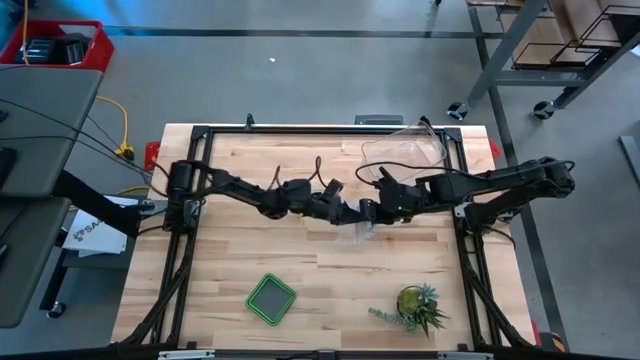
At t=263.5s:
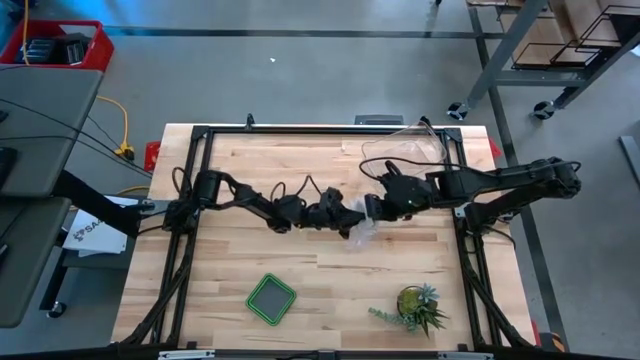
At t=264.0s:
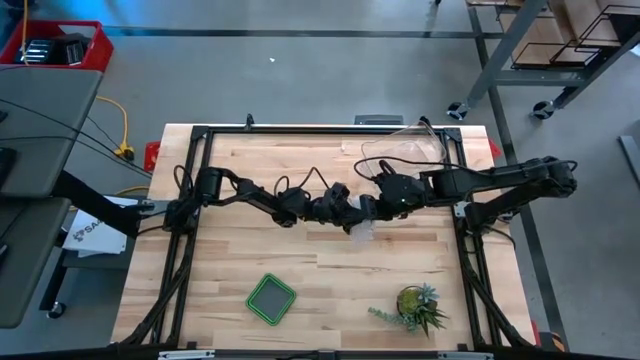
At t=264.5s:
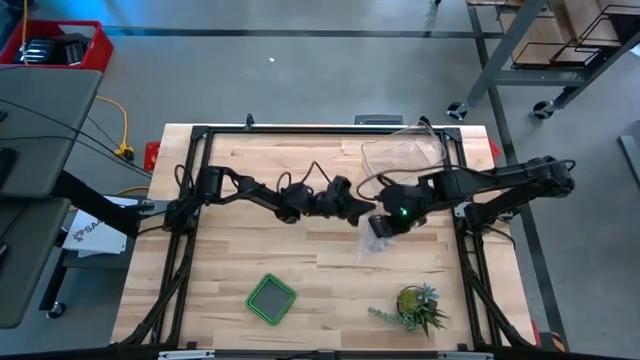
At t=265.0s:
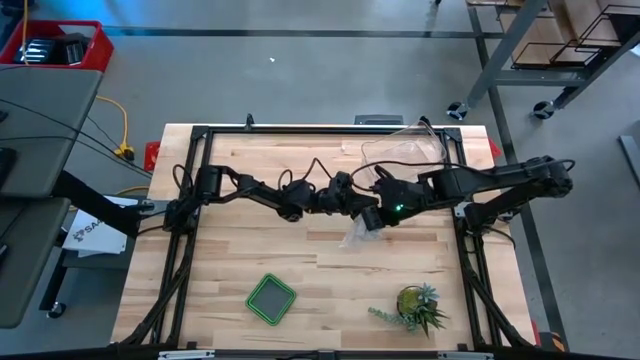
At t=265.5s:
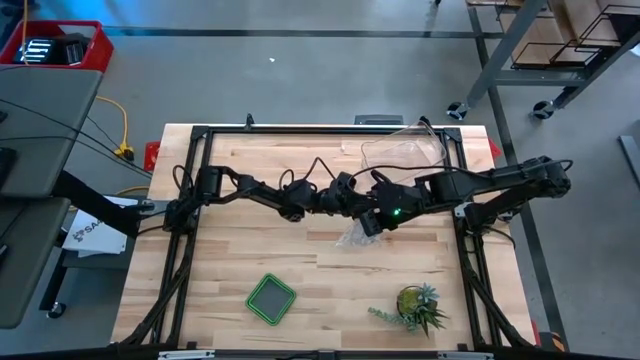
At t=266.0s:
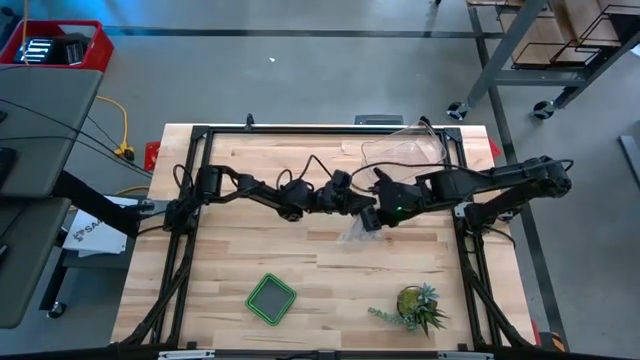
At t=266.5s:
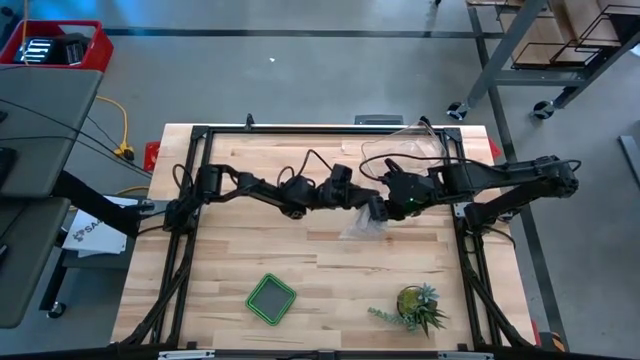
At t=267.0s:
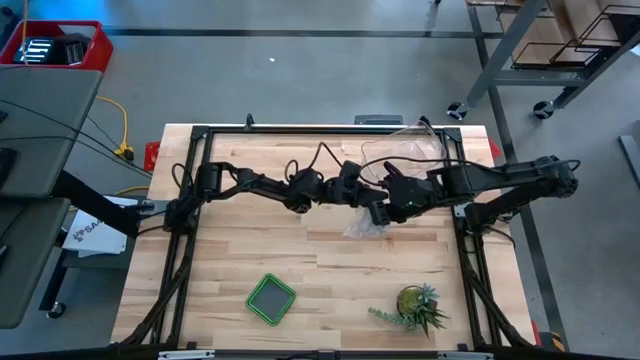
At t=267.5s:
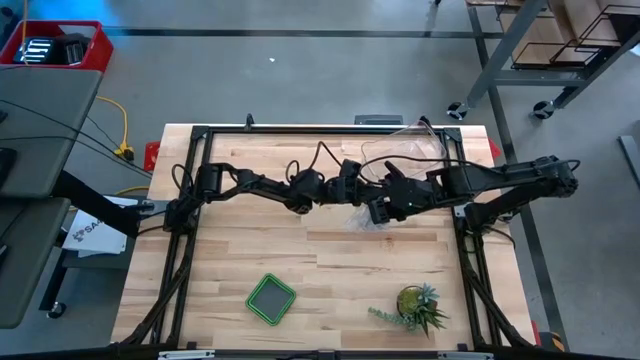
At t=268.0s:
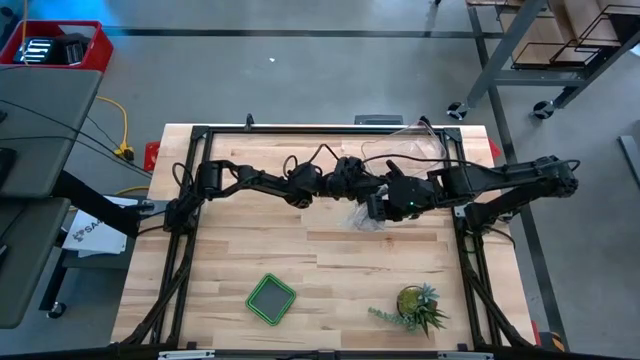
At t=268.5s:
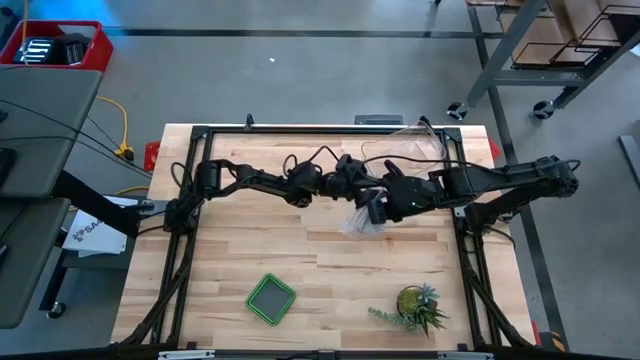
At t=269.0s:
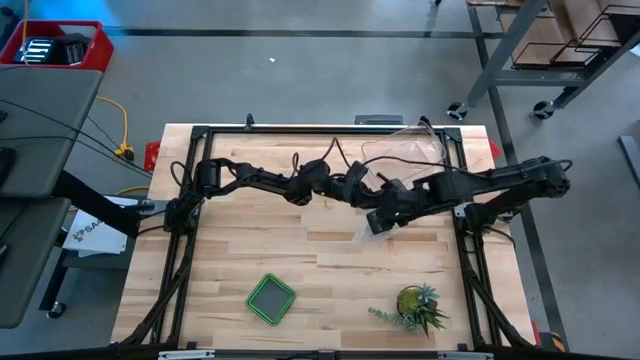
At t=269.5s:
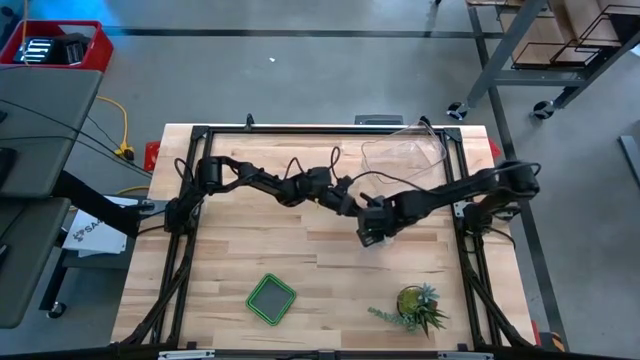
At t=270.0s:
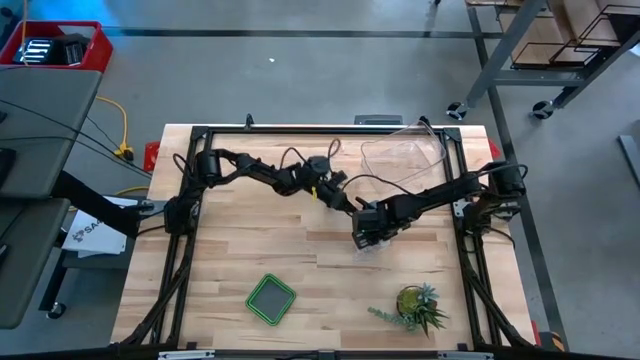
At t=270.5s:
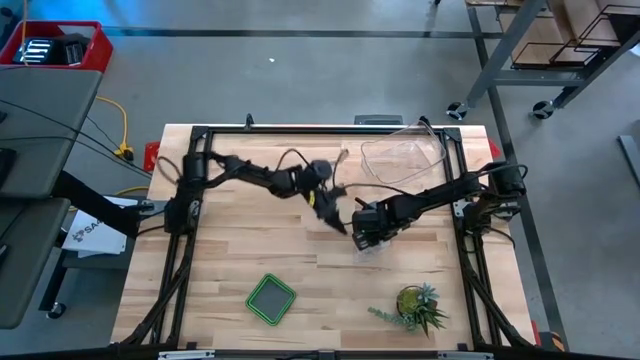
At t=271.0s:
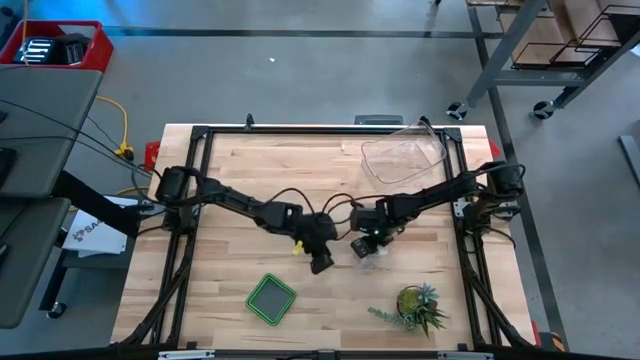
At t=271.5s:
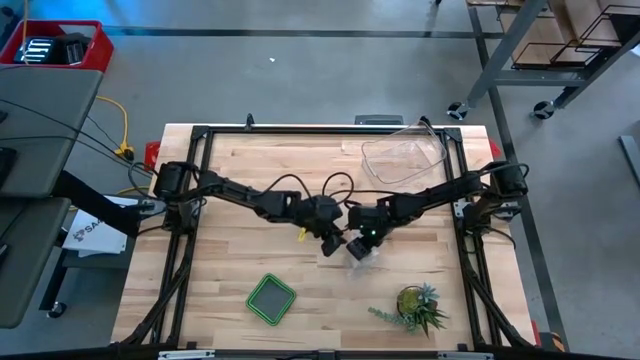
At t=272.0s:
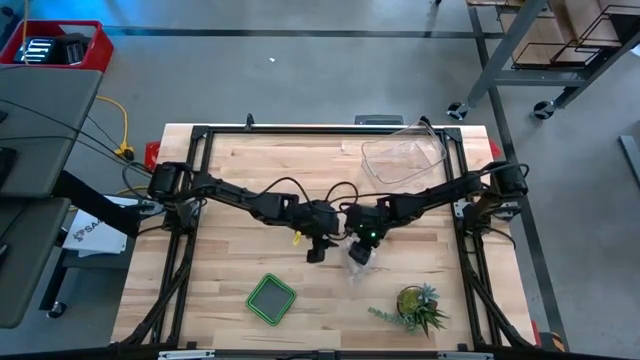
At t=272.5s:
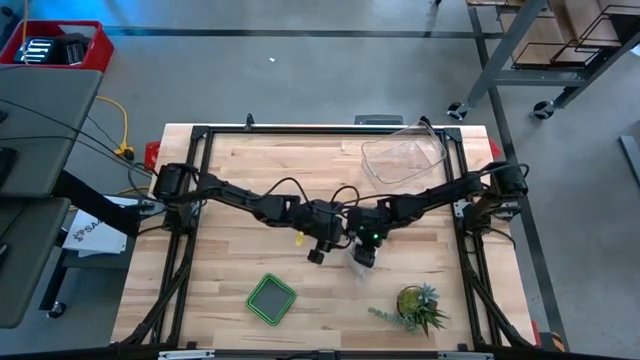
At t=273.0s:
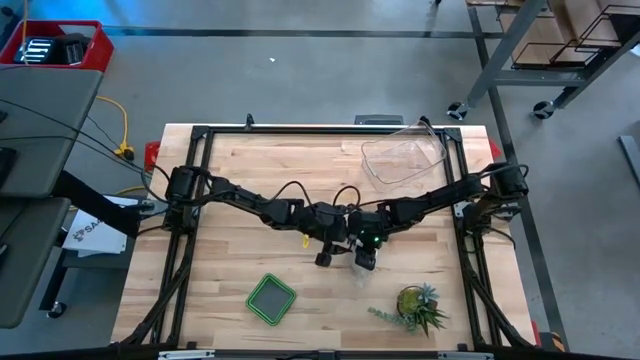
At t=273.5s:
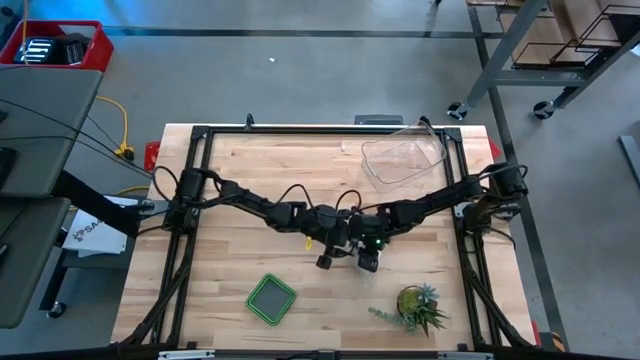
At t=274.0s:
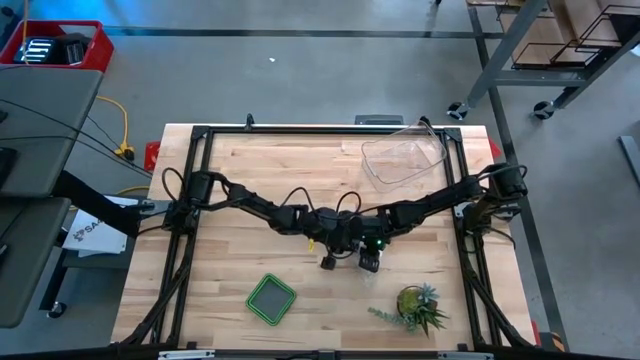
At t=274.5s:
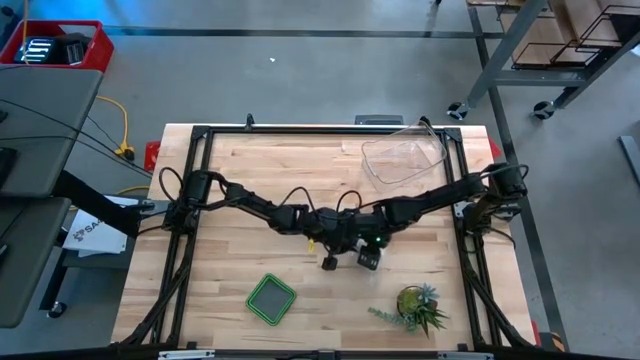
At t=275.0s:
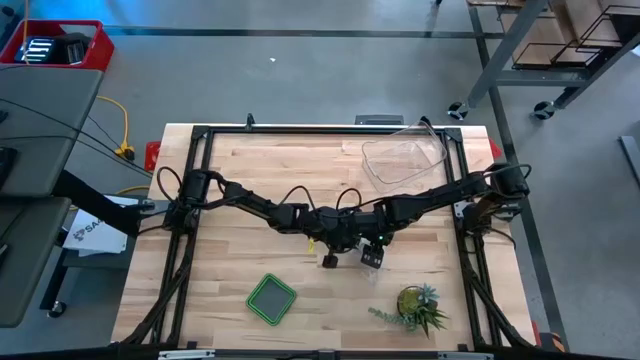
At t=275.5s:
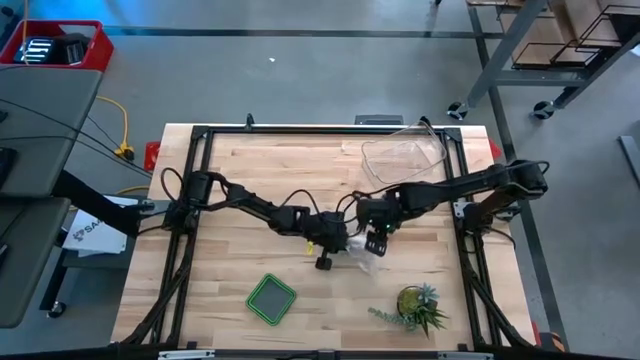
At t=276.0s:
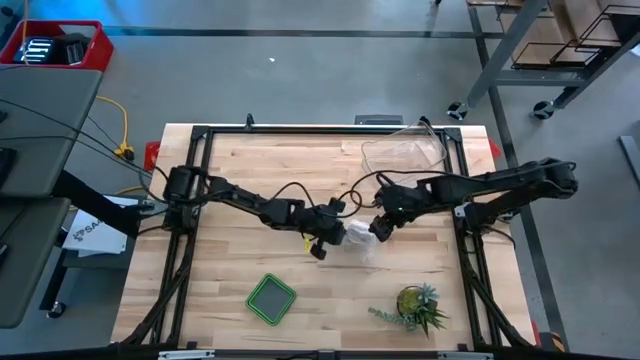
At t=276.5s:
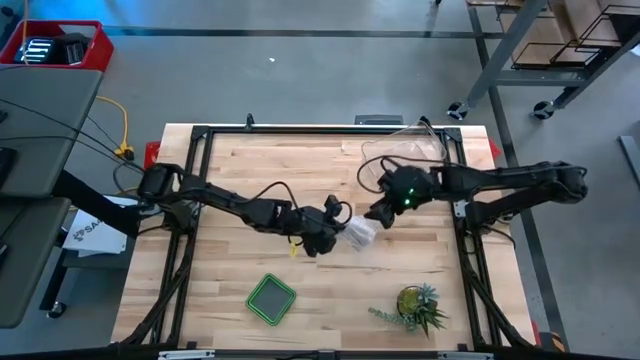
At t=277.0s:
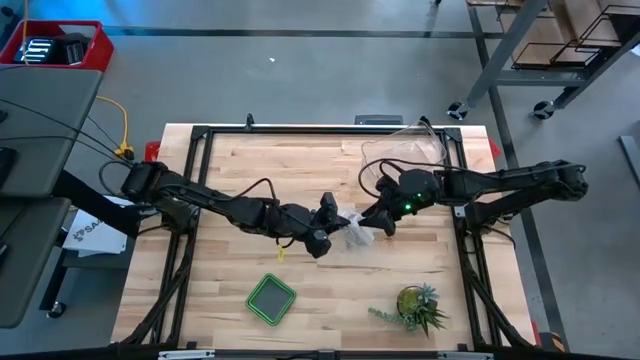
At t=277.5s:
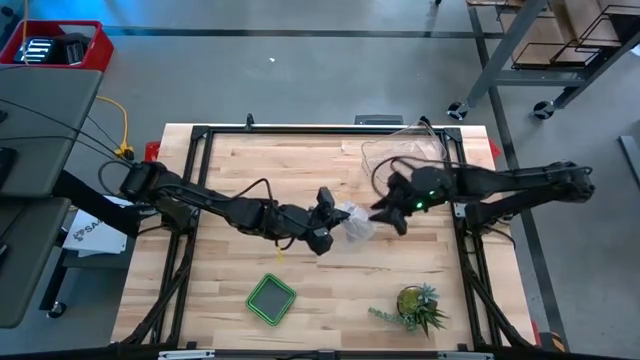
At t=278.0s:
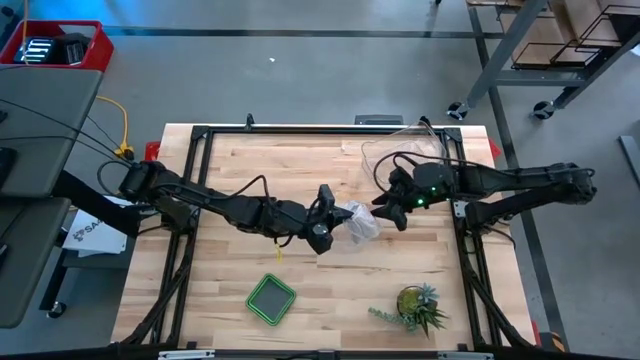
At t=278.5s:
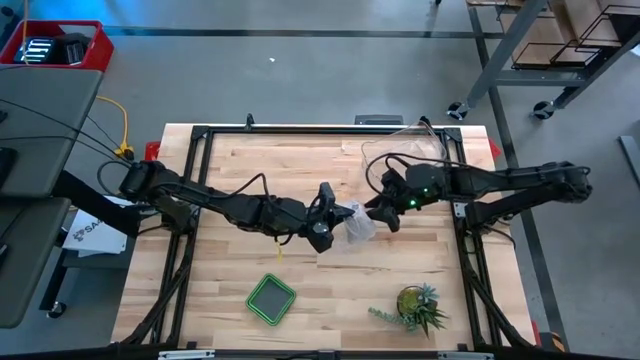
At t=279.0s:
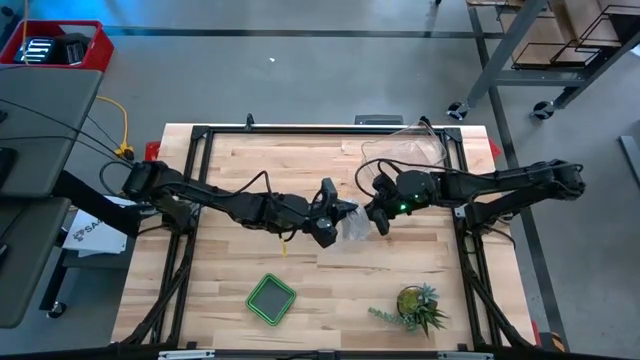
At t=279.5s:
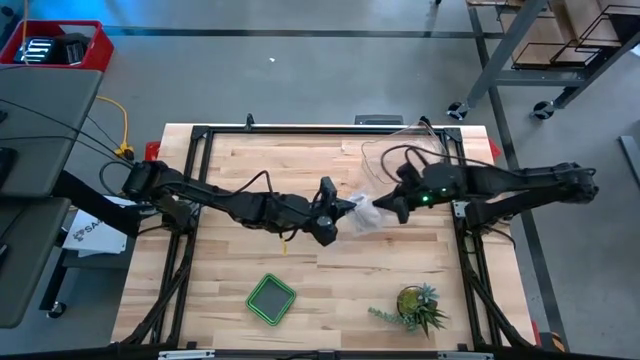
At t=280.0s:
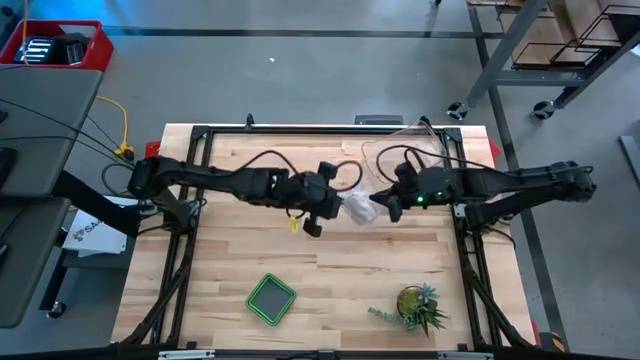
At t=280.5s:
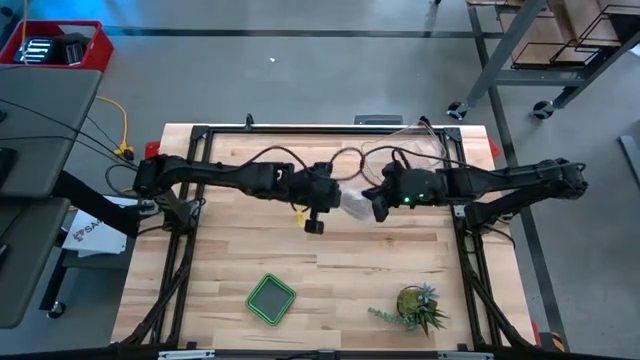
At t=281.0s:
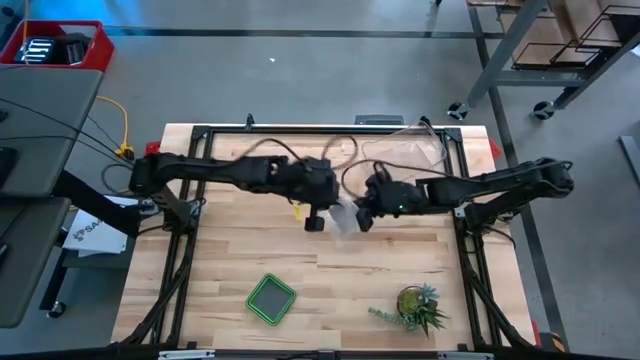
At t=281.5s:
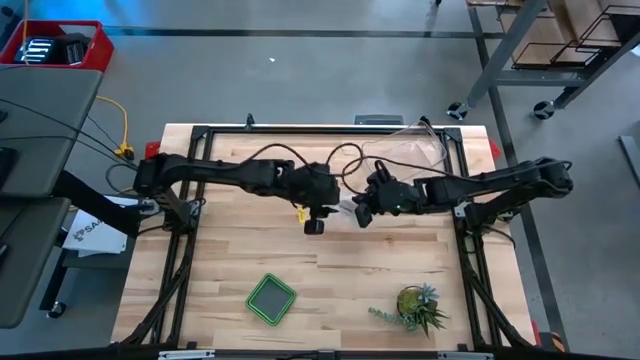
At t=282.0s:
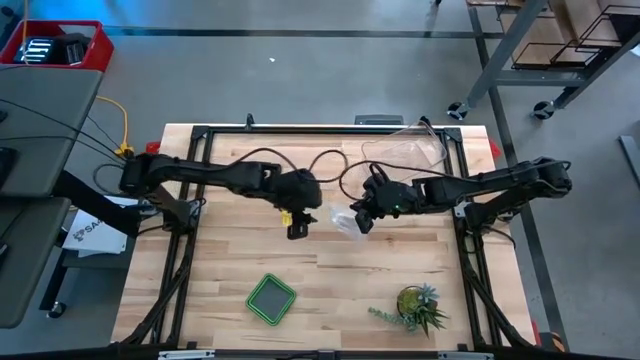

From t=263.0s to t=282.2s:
Task: Roll bandage
Put the rolled white bandage into the transparent zip bag

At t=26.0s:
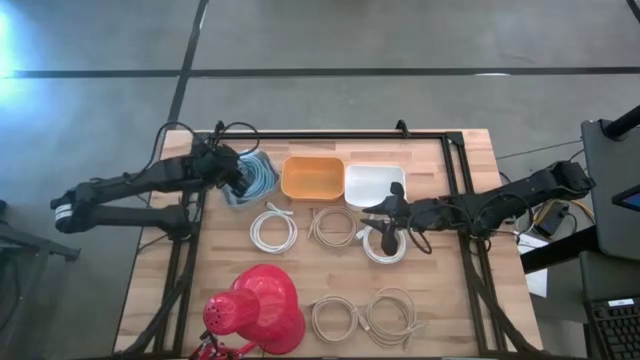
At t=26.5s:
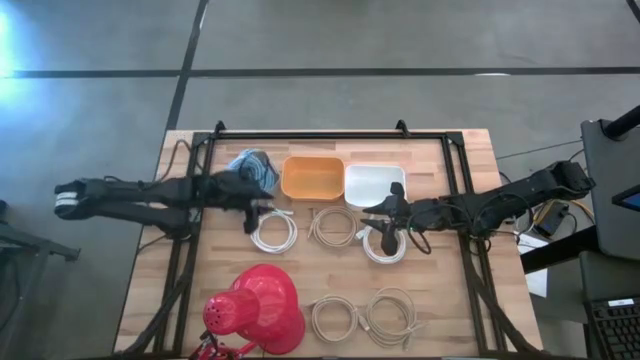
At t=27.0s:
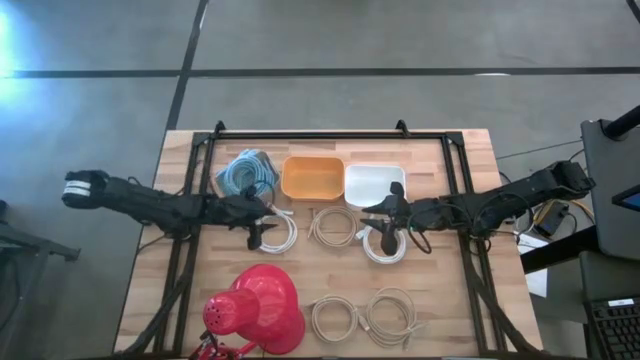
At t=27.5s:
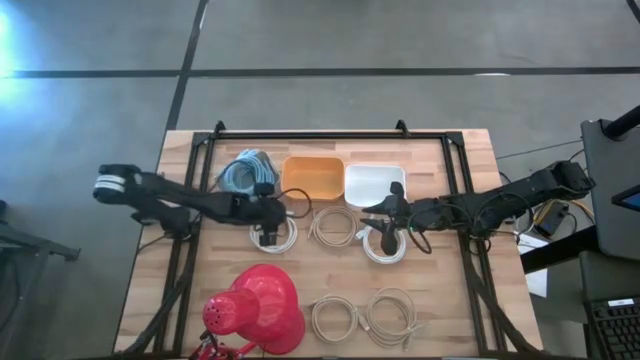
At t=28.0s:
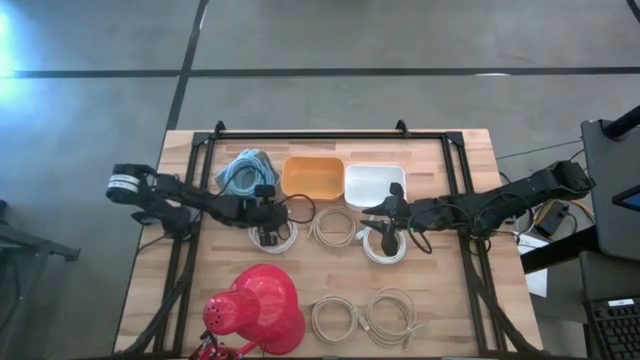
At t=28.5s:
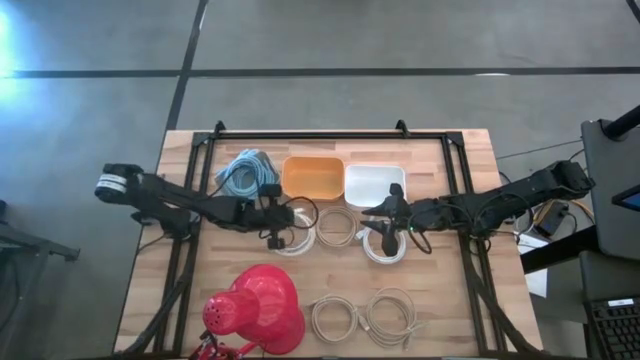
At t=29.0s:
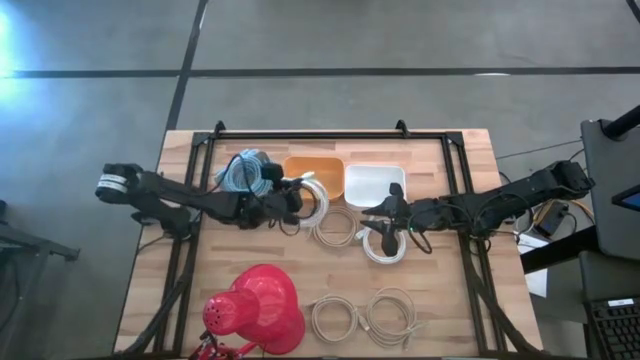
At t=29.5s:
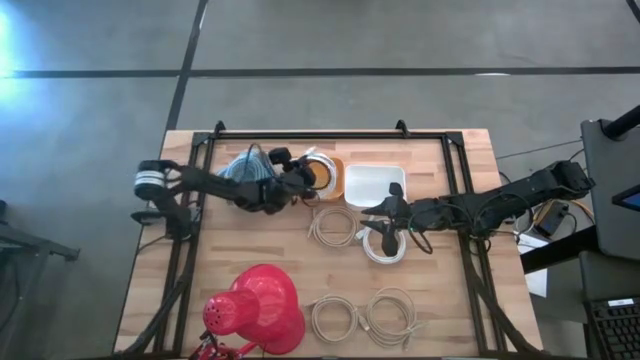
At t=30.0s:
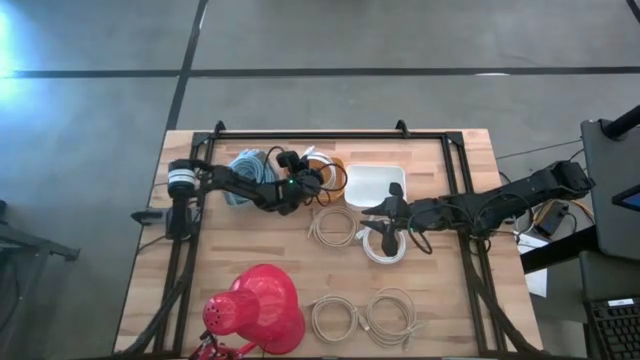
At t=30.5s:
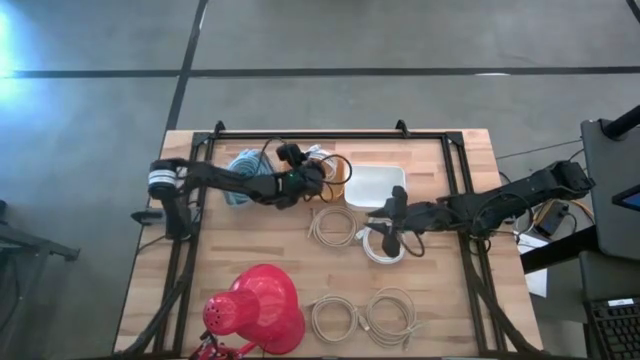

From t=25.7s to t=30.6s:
Task: Sort HDMI cables
Put the left white HDMI cable into the orange bin
